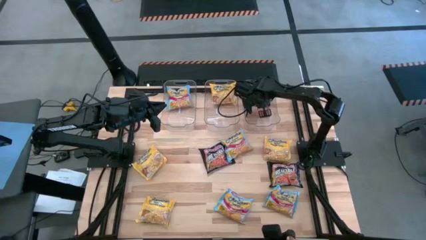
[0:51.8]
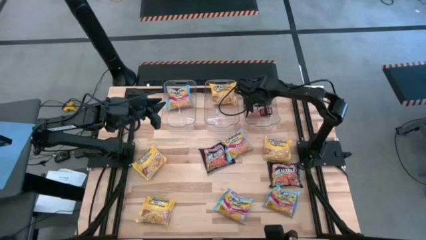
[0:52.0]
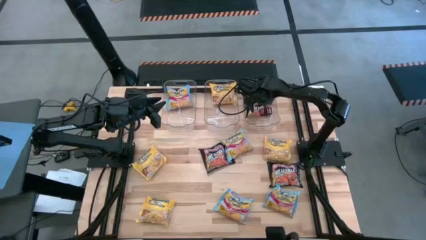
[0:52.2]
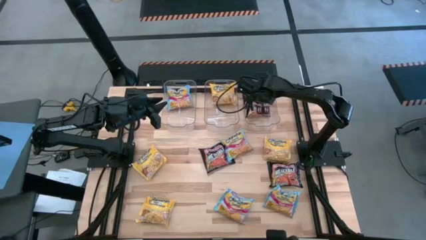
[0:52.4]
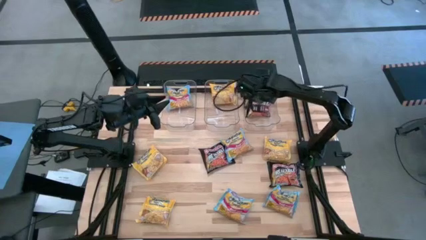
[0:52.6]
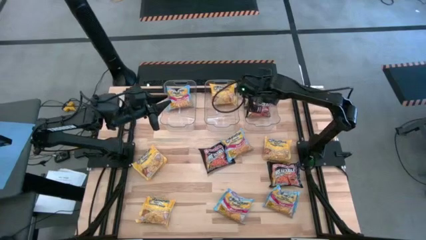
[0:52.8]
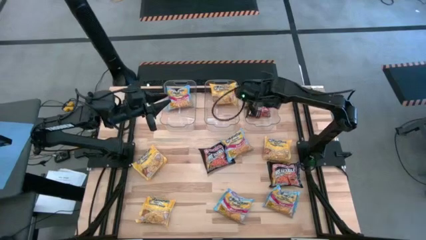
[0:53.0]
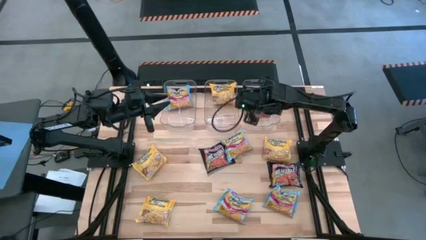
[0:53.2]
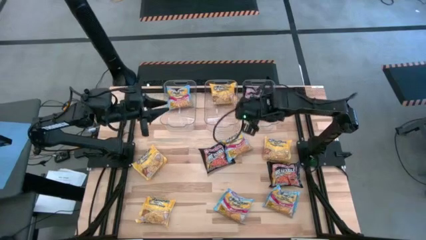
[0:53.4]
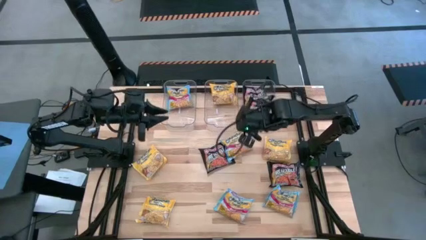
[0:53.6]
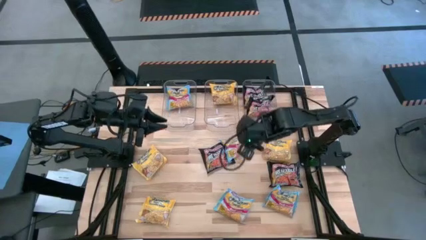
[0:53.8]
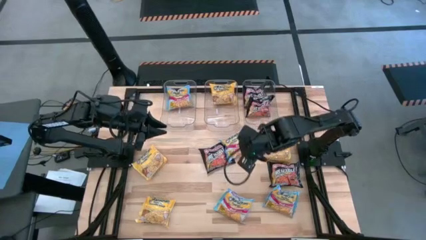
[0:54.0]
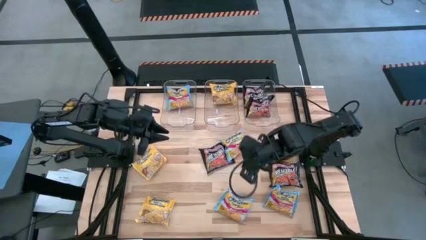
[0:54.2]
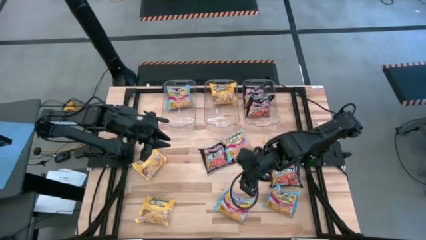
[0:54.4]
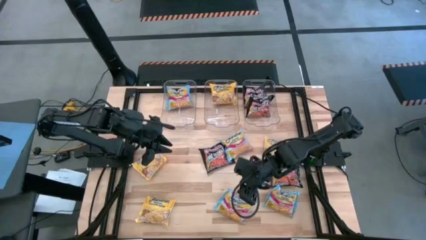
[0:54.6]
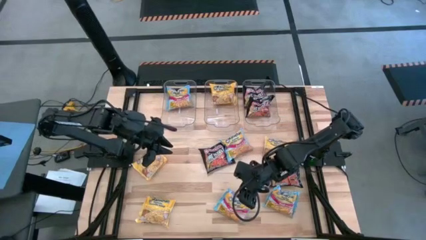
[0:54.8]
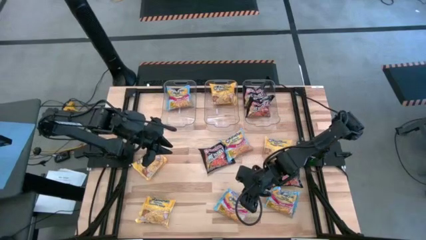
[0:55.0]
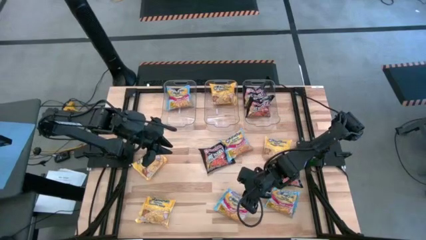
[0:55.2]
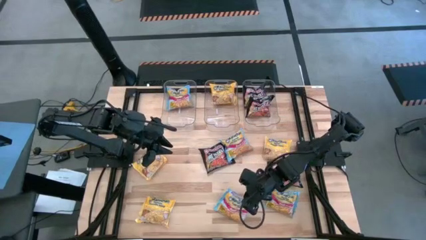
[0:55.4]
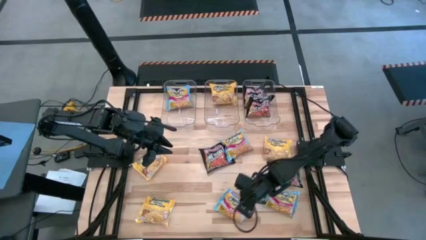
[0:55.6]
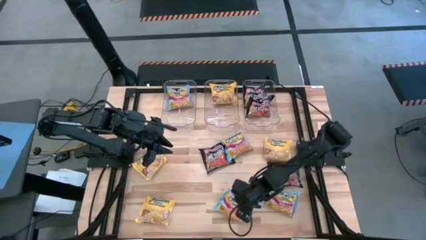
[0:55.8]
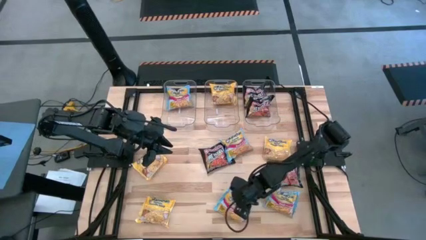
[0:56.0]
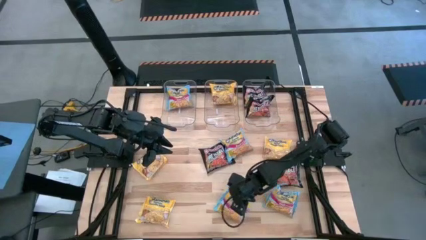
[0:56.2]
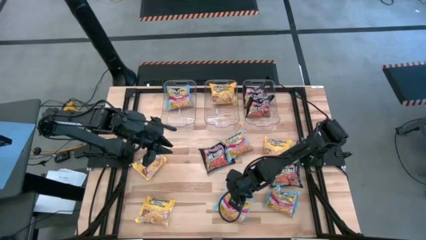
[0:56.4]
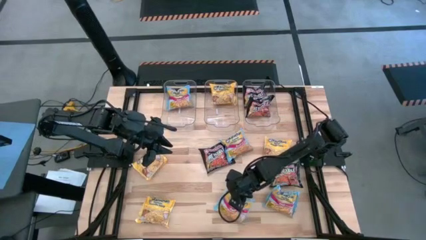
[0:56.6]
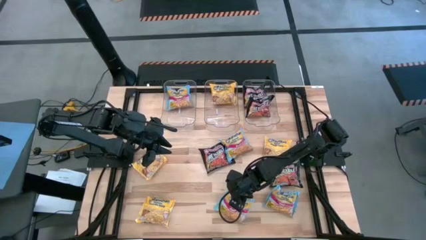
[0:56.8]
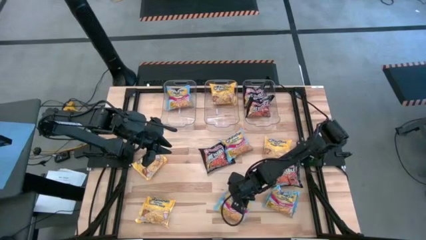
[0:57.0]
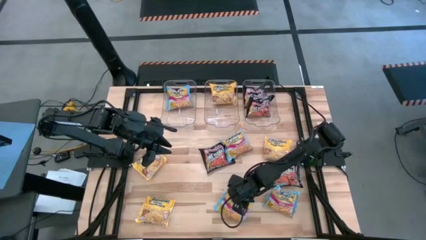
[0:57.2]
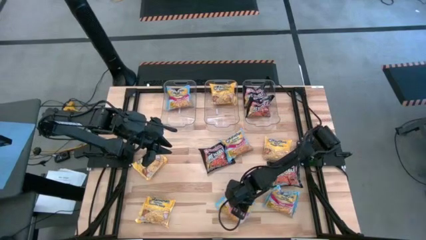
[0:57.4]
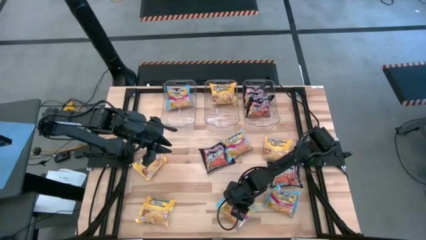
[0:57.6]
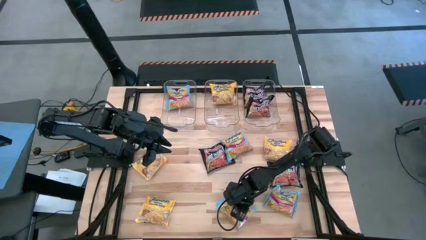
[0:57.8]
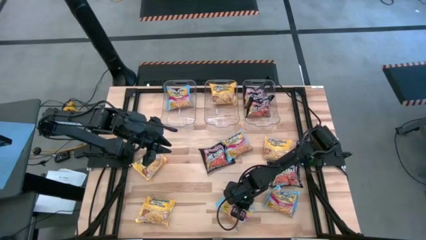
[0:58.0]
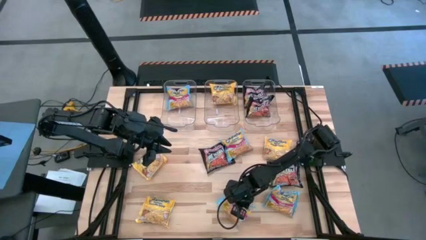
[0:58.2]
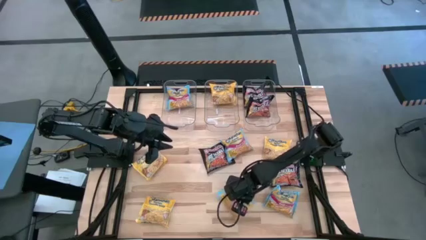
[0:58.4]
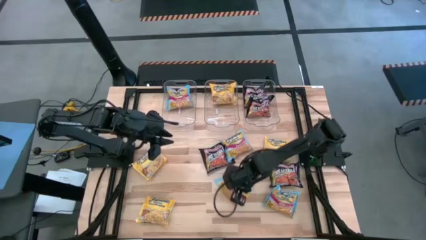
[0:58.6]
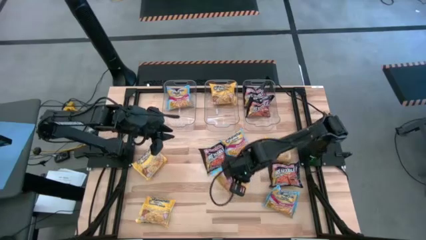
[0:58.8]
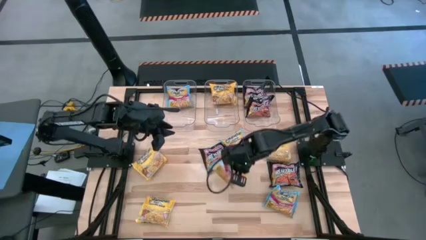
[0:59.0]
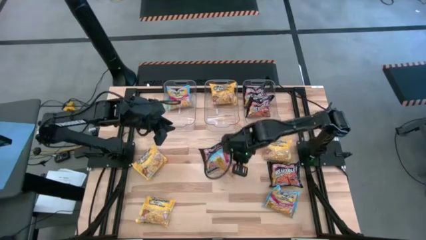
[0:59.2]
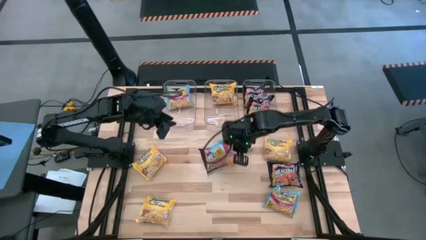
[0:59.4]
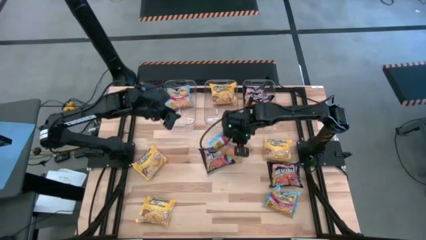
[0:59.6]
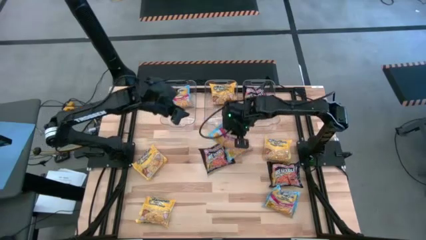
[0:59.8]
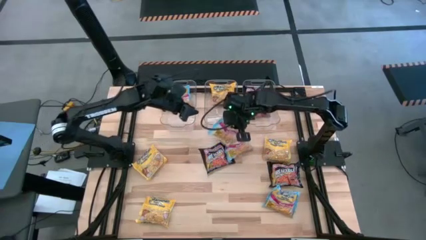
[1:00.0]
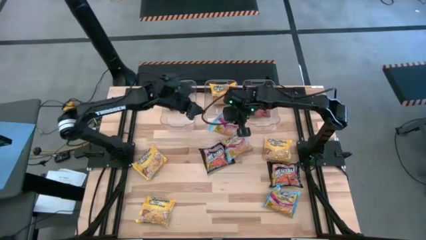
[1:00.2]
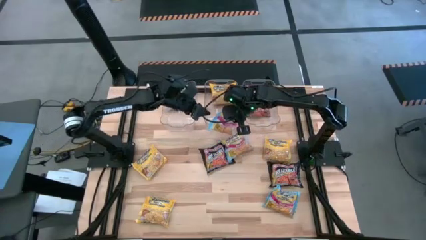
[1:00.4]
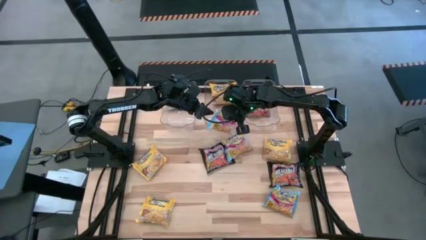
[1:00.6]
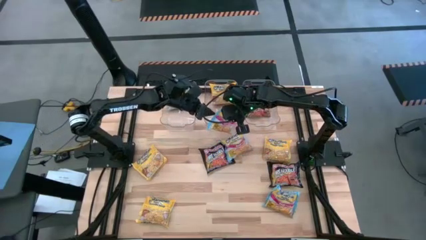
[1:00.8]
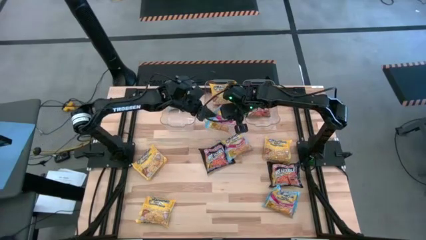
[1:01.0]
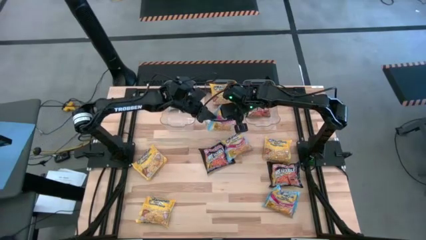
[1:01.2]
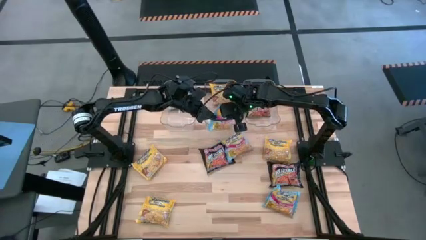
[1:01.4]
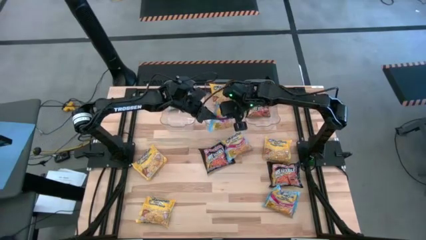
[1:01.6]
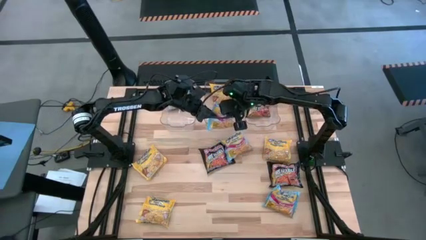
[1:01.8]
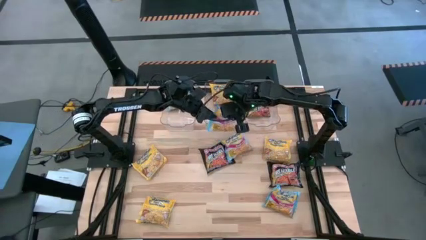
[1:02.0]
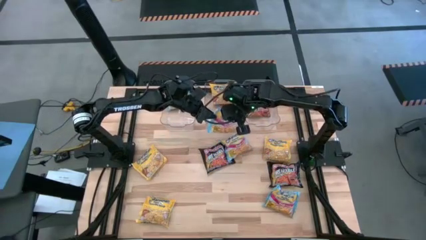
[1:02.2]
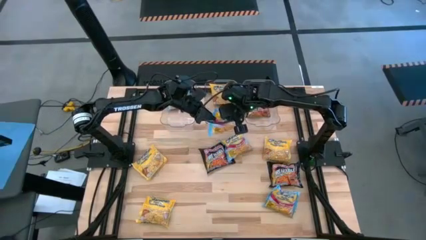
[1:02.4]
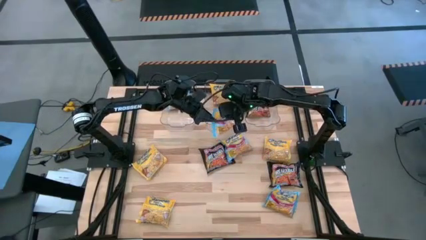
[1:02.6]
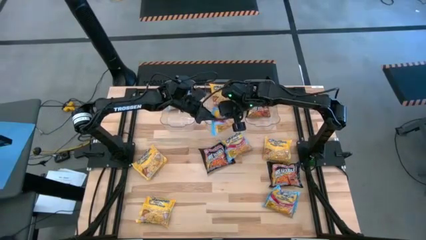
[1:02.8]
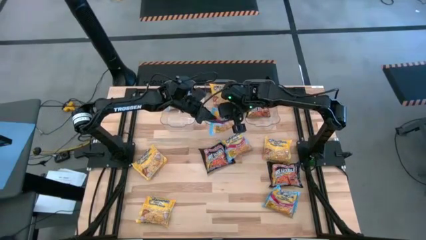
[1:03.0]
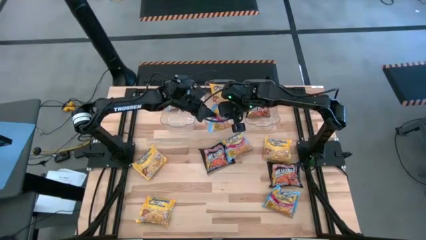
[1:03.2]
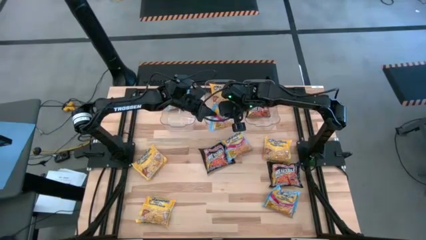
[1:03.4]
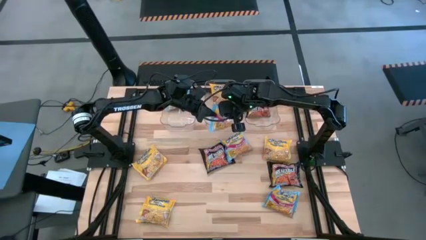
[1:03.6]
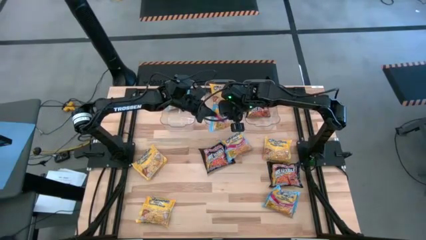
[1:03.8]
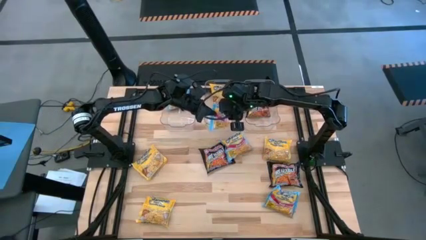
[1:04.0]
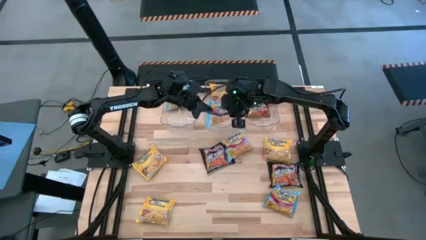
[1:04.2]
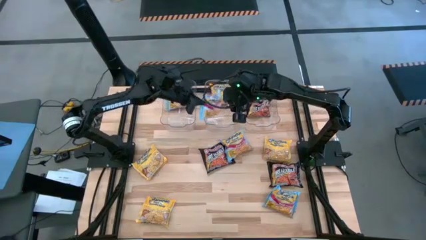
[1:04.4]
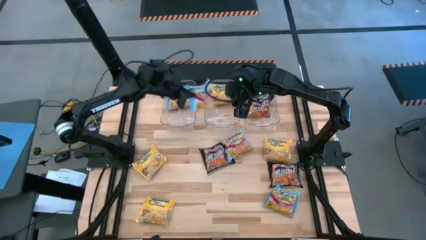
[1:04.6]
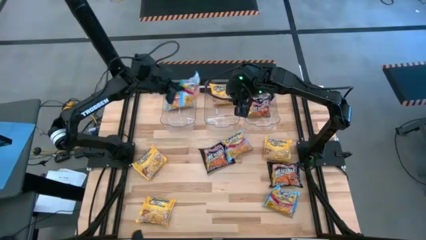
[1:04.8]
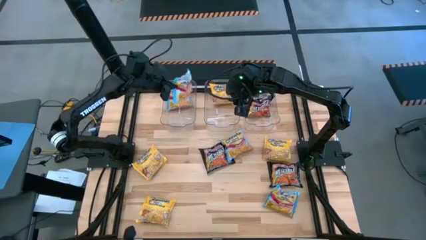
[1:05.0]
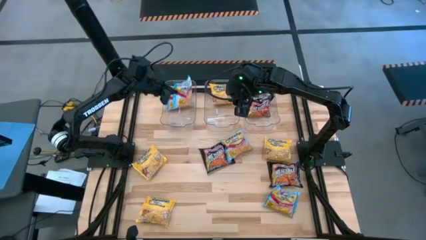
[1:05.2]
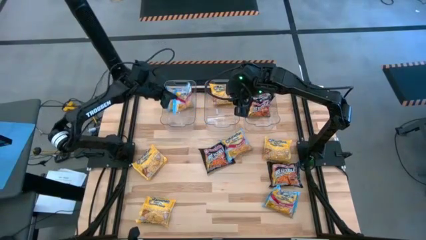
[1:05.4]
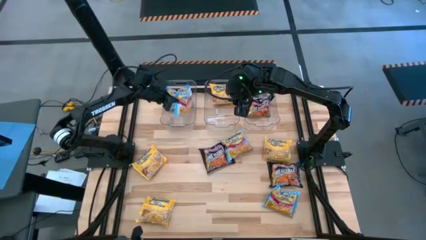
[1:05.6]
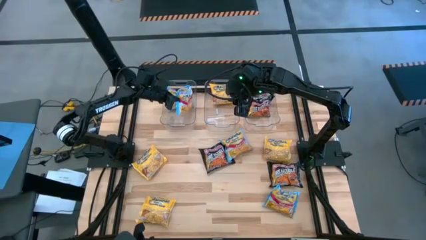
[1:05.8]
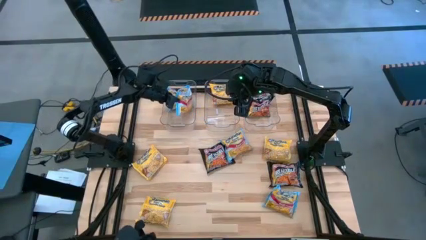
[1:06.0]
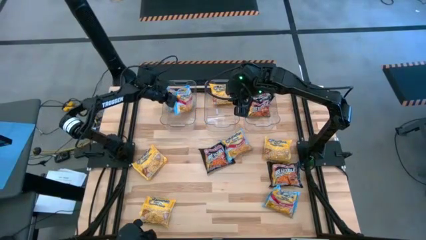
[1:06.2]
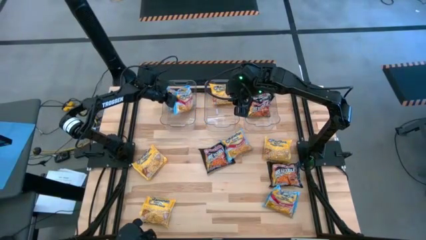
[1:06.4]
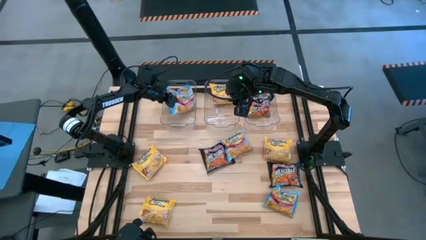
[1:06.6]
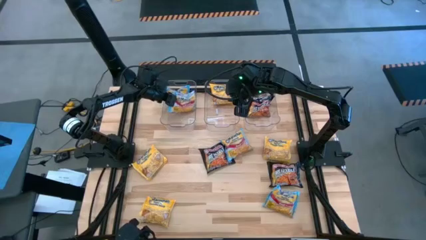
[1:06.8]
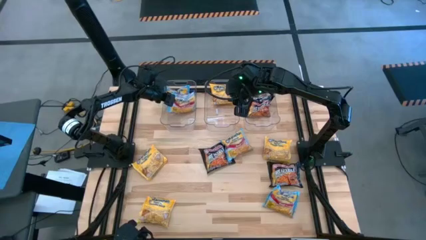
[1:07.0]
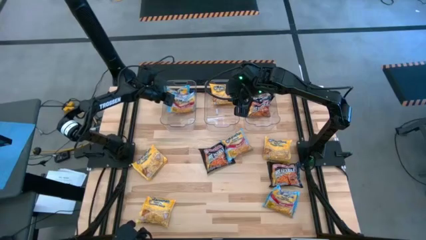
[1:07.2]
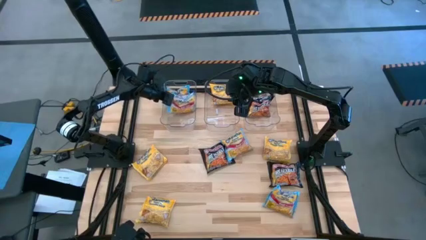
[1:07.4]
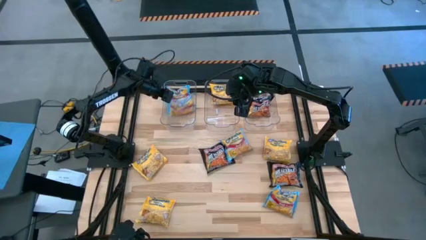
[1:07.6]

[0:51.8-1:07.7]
Task: Sort Maruchan noodles
Put the blue noodle pack into the left transparent bin
